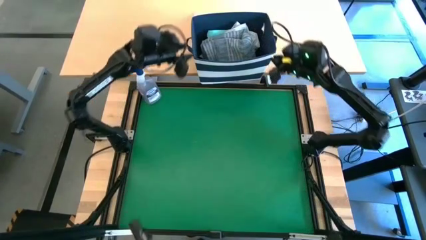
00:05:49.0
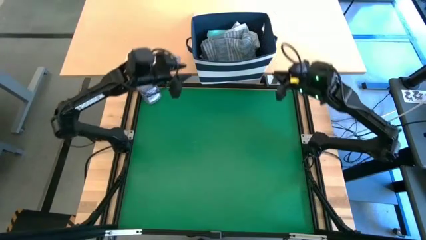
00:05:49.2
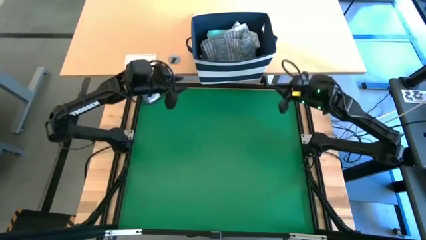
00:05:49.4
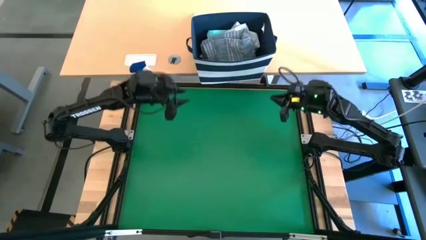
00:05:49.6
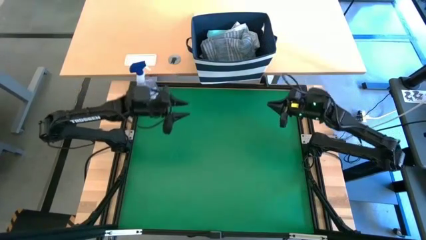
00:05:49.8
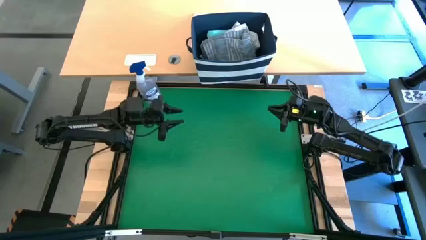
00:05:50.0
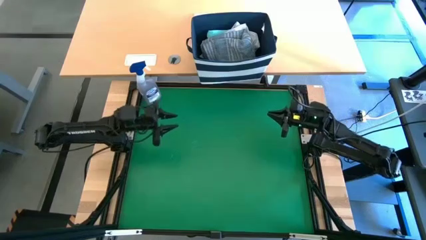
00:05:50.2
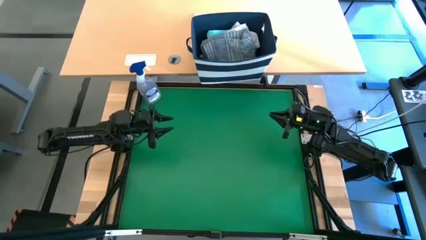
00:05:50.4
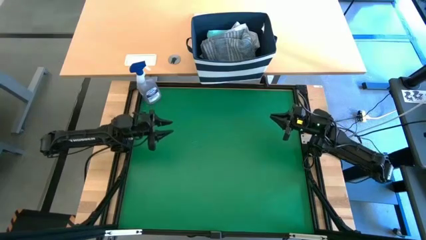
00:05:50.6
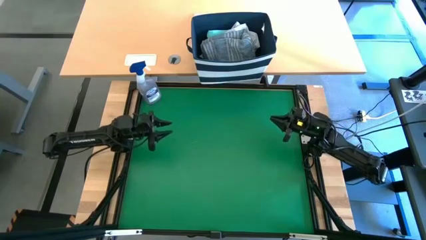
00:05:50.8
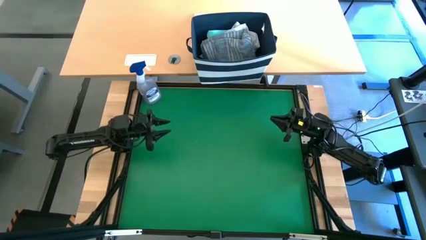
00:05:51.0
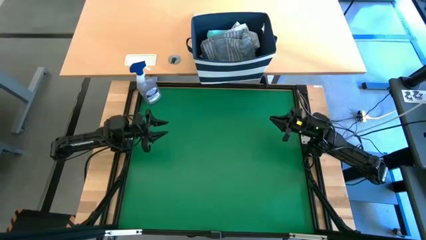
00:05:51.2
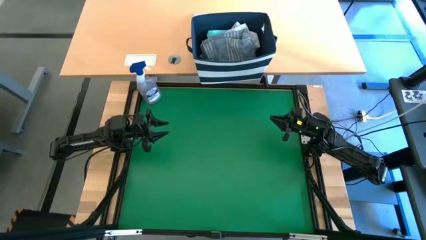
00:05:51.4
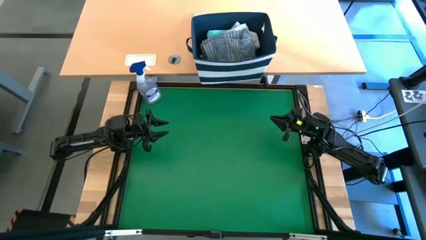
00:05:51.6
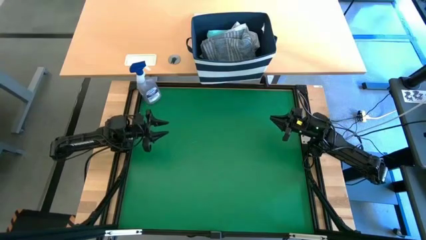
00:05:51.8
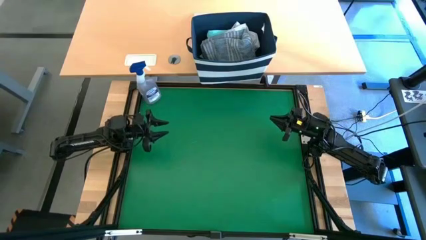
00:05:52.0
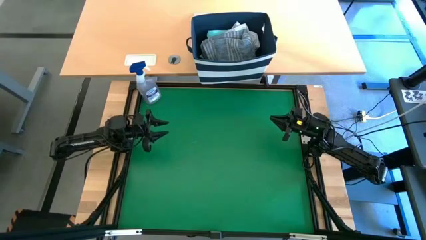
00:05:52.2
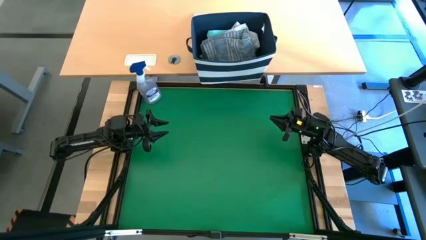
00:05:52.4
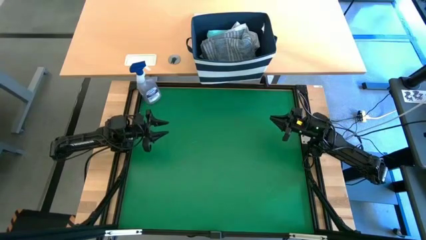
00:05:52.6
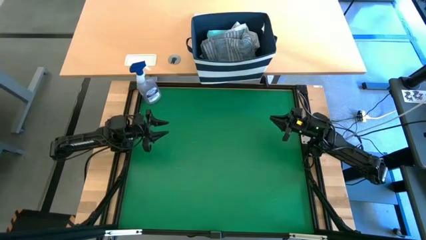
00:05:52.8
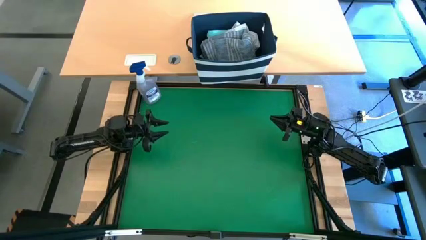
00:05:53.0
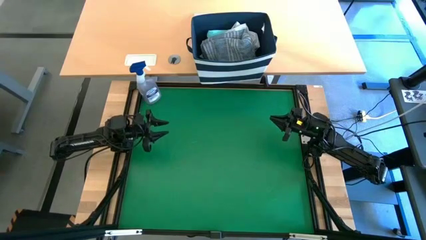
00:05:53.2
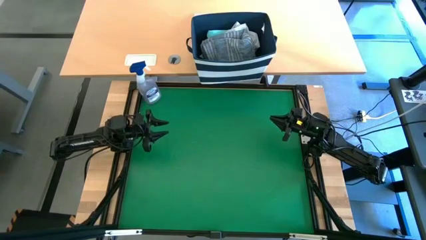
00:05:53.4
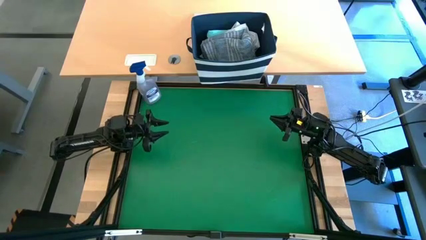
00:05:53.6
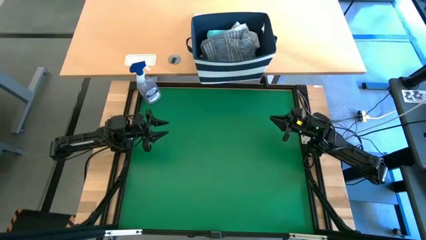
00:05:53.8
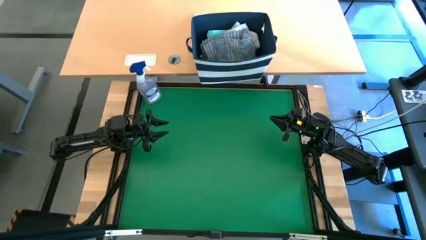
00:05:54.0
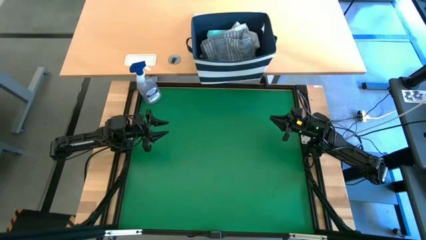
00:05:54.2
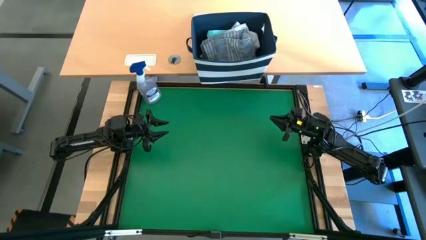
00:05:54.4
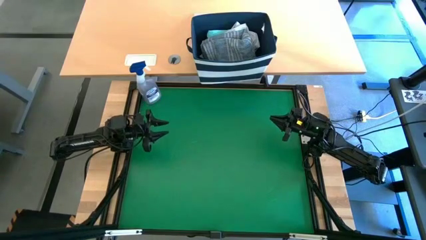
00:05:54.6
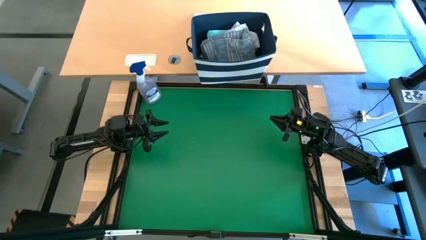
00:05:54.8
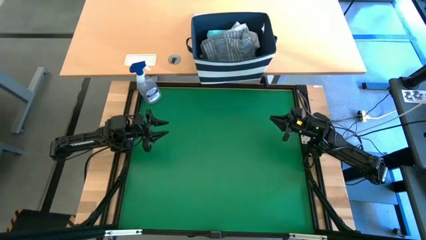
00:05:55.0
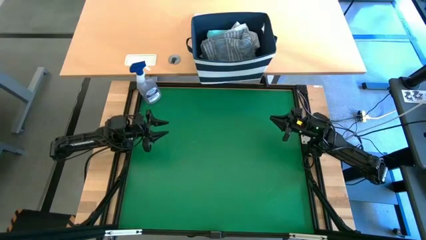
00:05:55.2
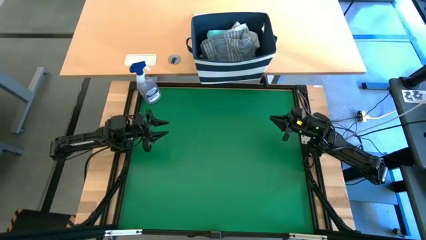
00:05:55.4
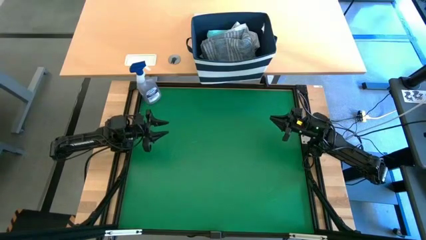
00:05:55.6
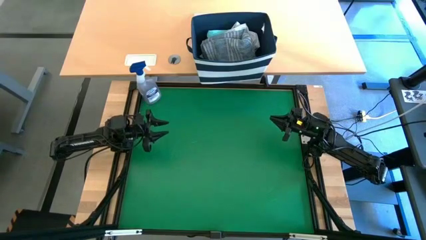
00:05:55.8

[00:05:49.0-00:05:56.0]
Task: Fold laundry
Return to Home Position

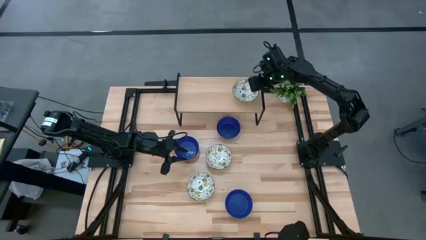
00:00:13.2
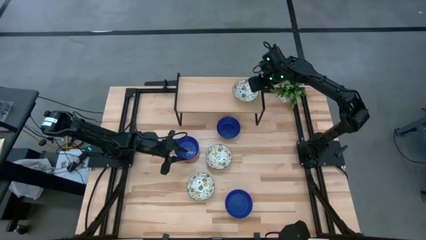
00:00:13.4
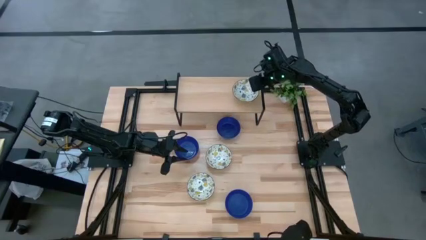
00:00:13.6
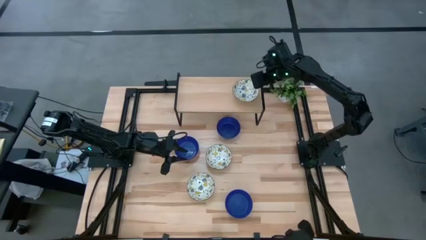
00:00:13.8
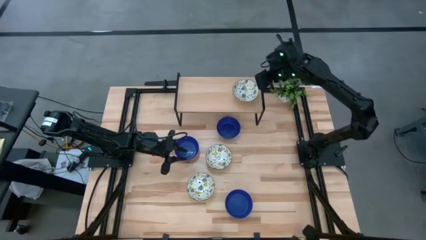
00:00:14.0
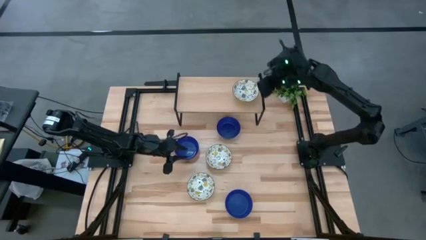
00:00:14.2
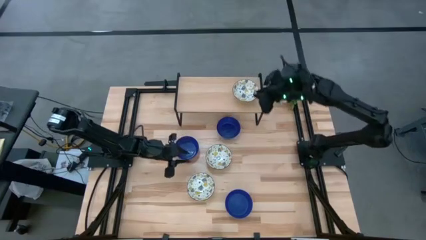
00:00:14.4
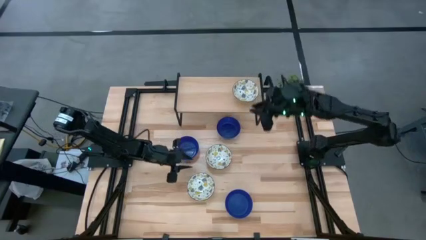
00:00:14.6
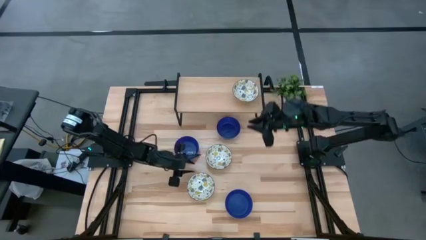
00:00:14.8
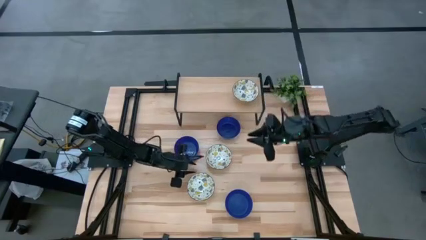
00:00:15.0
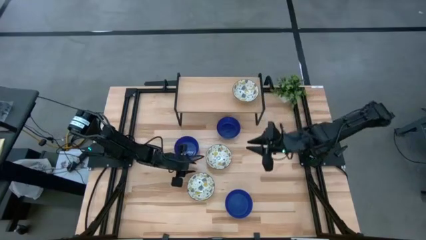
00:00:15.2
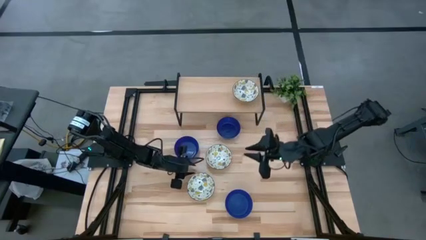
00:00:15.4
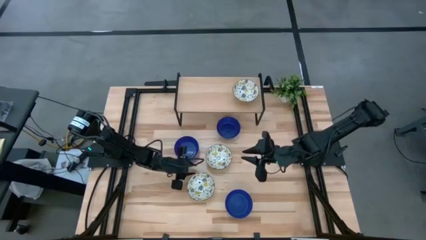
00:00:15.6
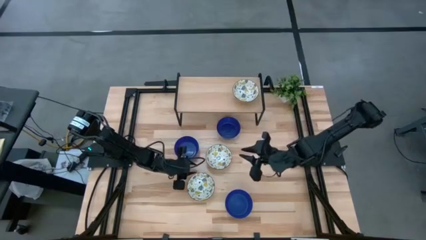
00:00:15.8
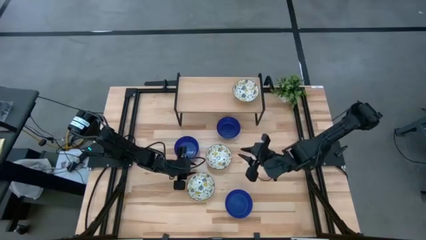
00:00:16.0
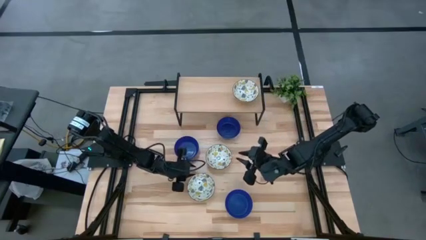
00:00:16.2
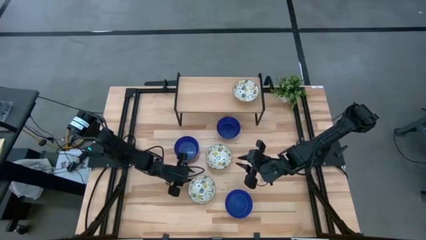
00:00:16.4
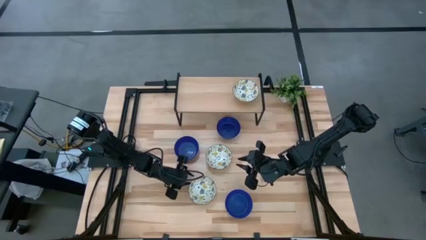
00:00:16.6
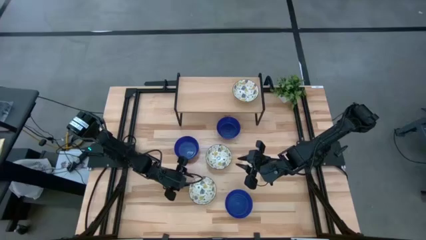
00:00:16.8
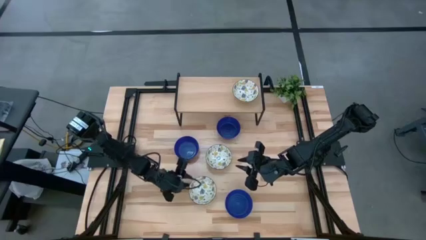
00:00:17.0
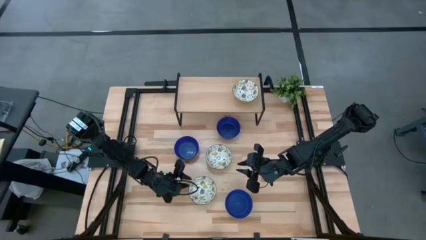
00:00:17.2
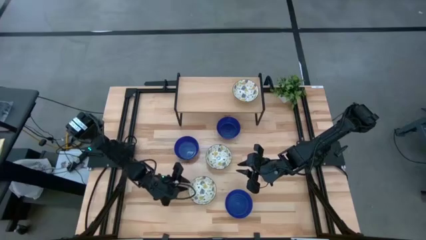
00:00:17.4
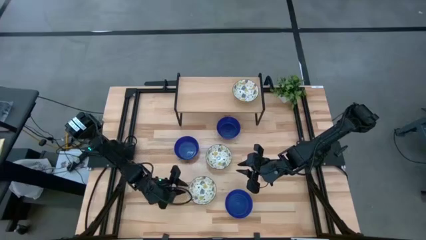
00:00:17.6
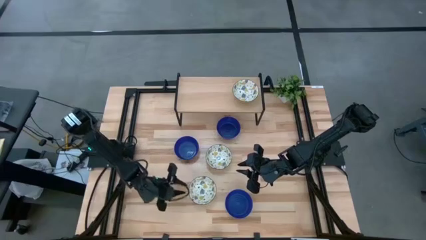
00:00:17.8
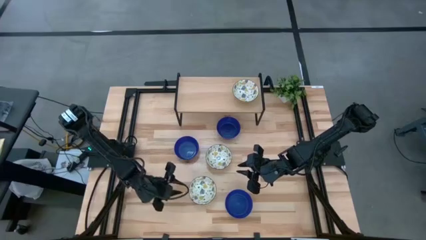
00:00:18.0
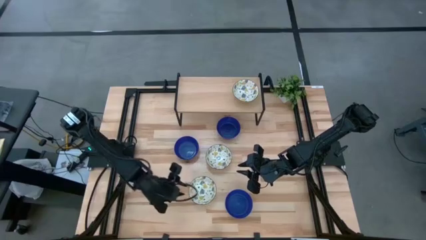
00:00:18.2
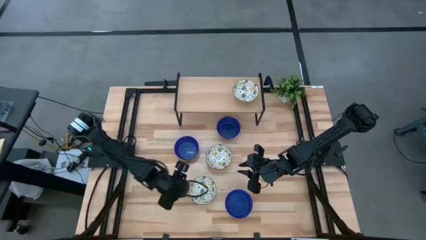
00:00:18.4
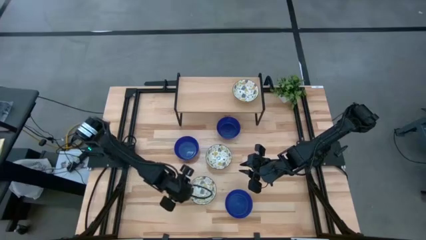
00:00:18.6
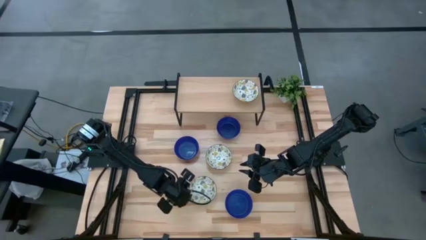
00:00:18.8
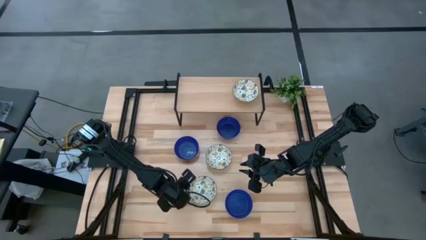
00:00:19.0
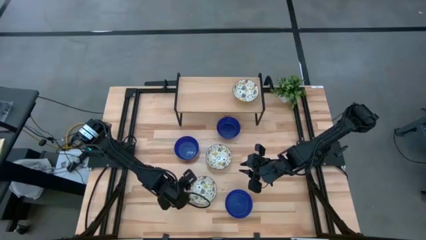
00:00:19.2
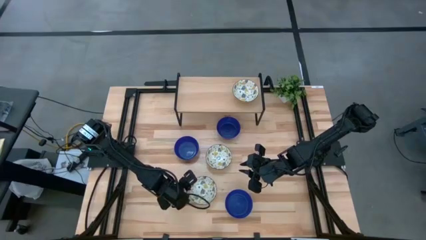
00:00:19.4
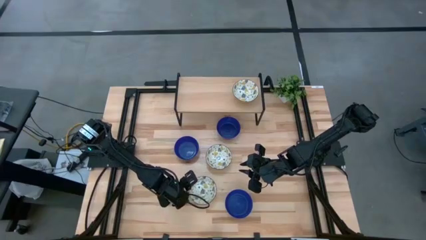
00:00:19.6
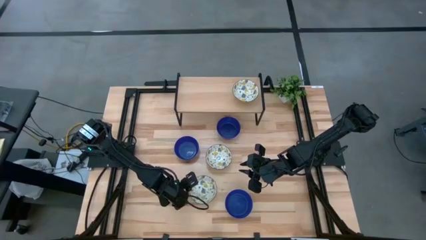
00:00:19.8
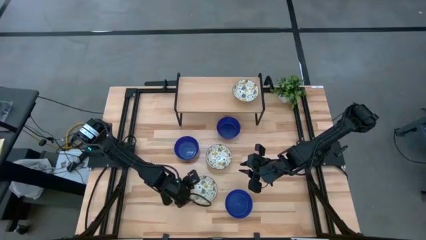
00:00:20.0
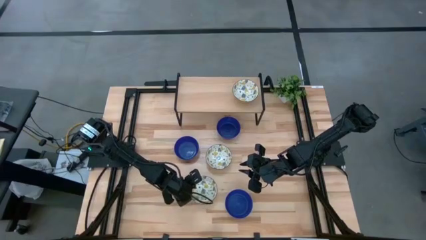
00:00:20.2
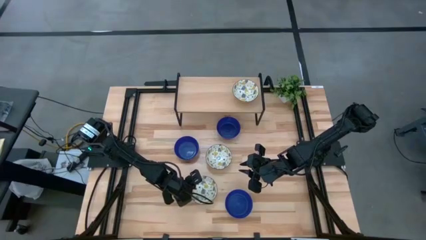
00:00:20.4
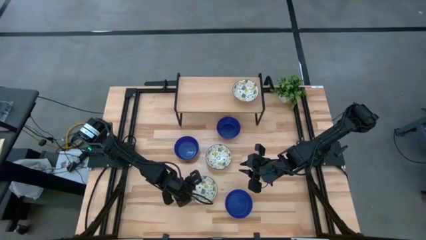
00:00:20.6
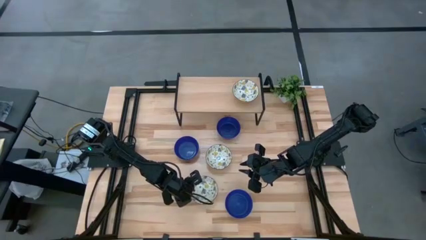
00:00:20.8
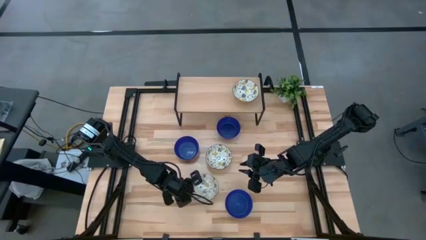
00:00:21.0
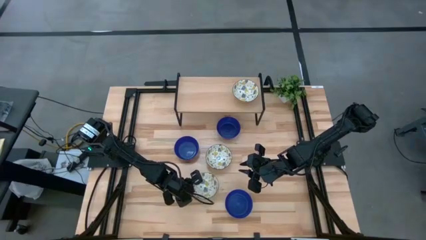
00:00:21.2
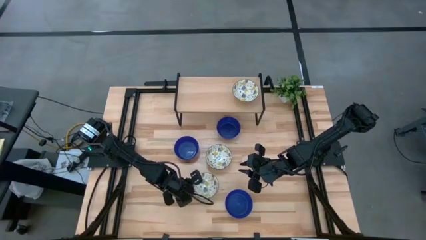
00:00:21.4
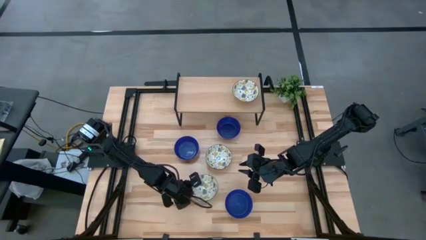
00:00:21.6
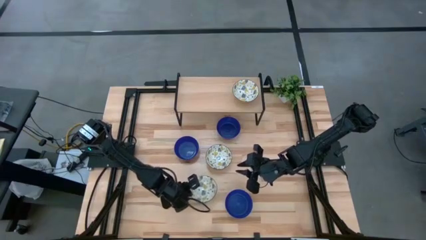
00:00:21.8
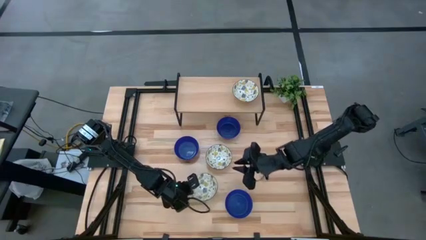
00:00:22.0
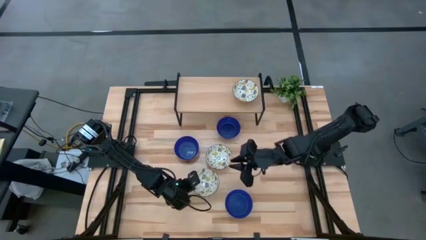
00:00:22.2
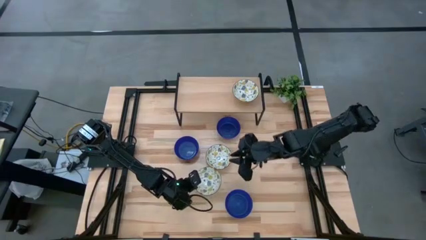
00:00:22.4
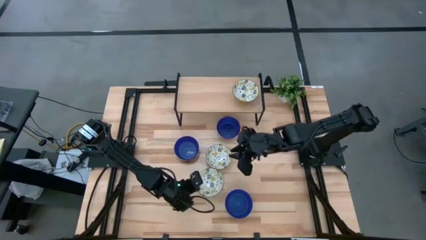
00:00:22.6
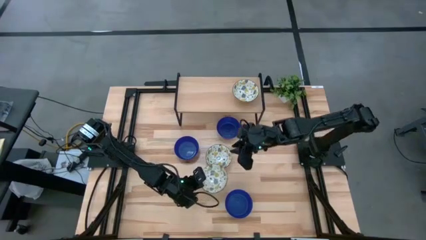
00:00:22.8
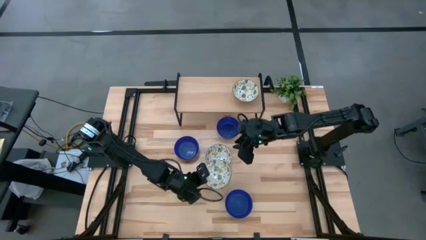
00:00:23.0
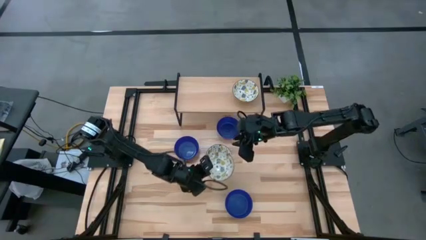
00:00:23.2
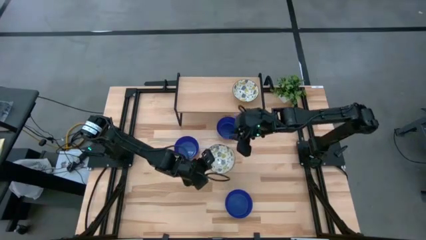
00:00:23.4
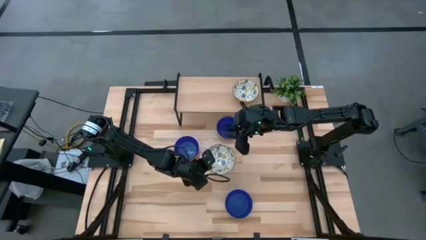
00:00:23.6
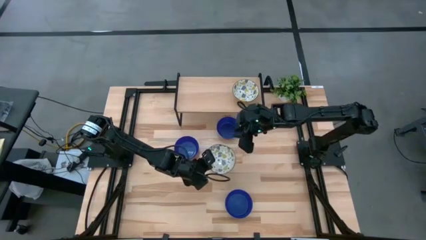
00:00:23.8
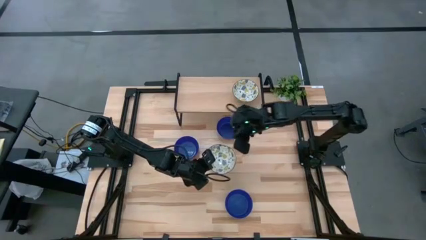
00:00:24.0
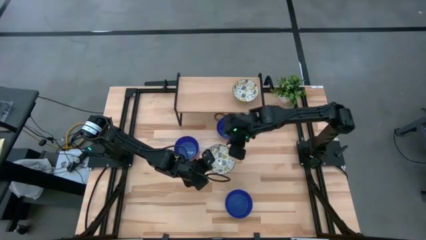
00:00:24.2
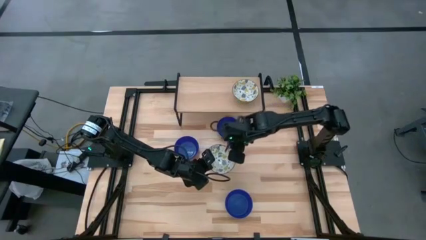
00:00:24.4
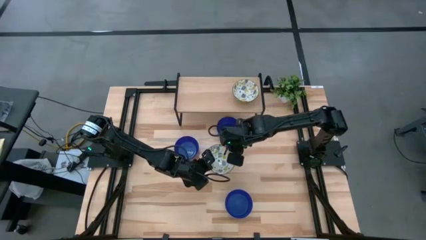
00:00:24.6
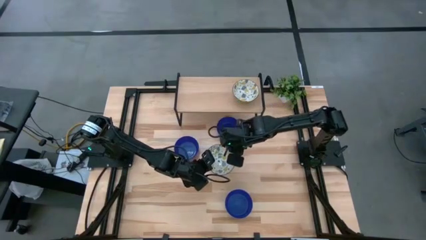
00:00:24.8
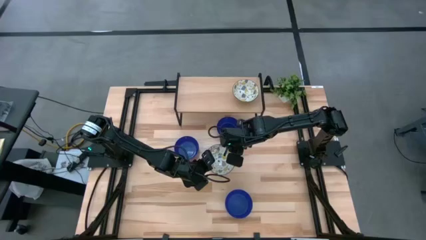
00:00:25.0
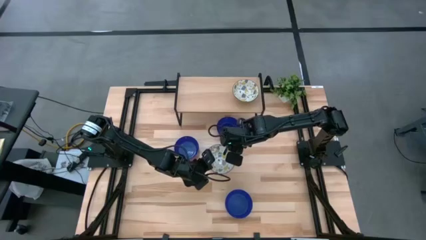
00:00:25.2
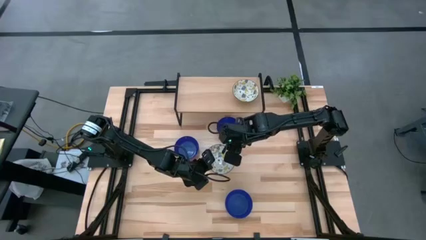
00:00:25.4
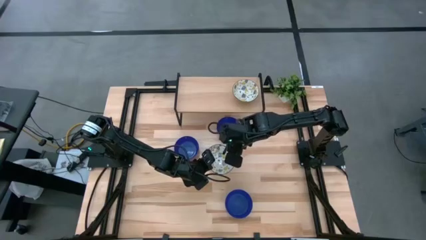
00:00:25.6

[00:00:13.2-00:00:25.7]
Task: Pick & Place Mini bowls
Stack the bottom yellow patterned bowl on the yellow patterned bowl on the shelf
